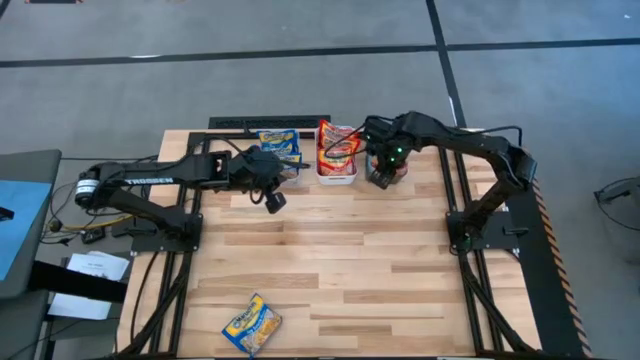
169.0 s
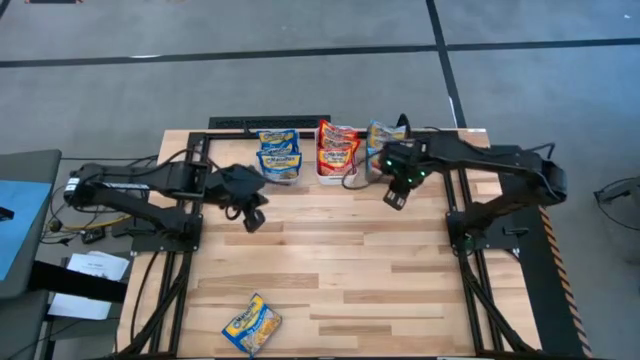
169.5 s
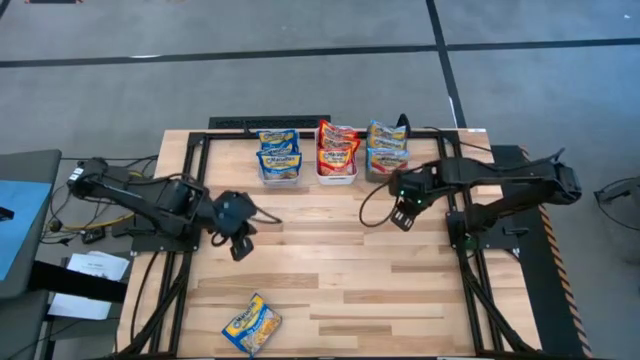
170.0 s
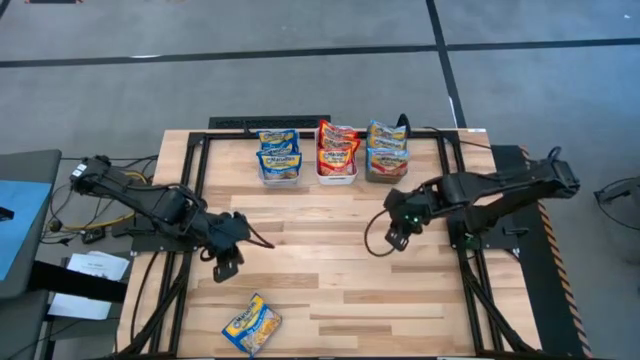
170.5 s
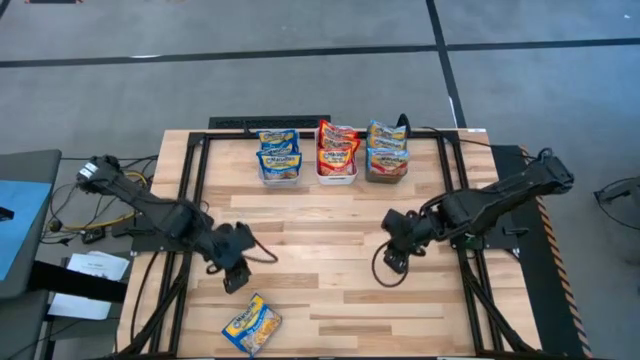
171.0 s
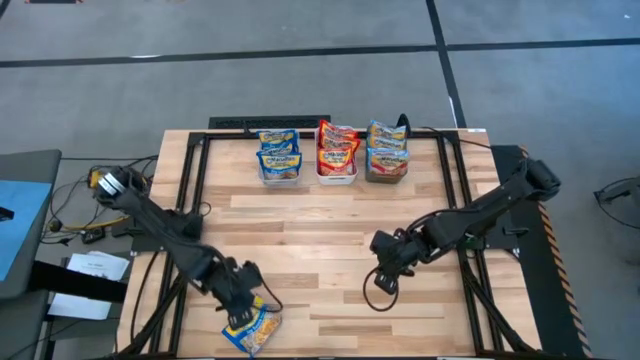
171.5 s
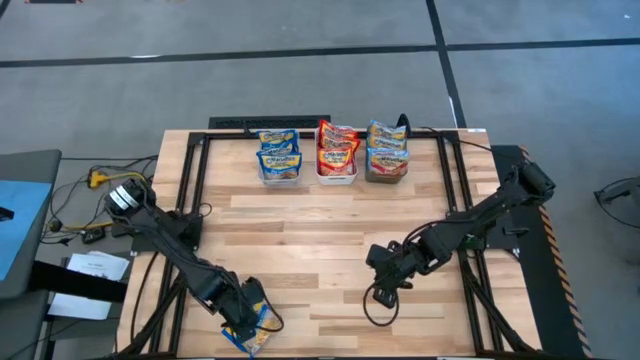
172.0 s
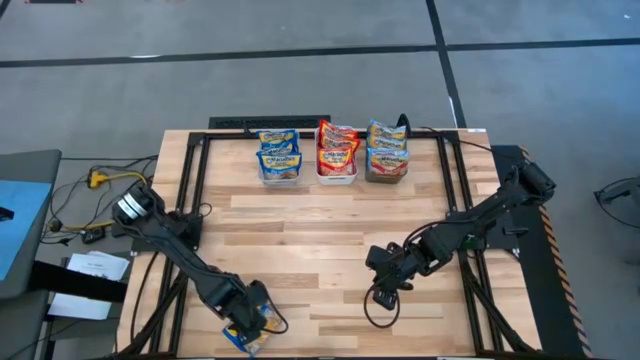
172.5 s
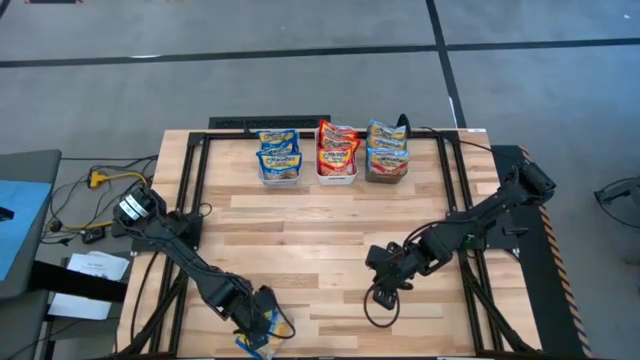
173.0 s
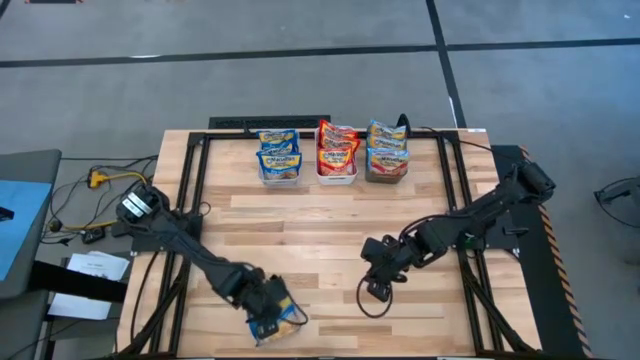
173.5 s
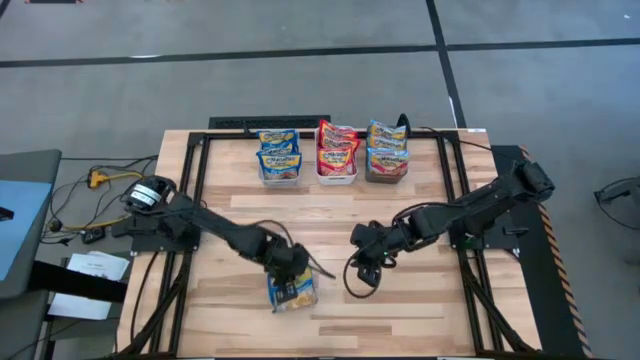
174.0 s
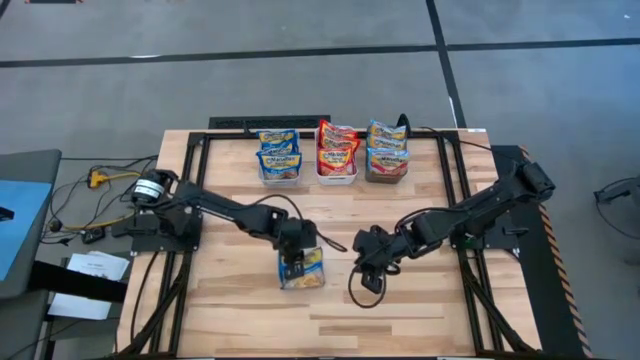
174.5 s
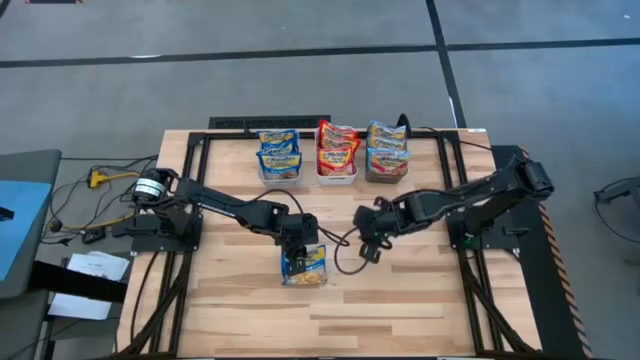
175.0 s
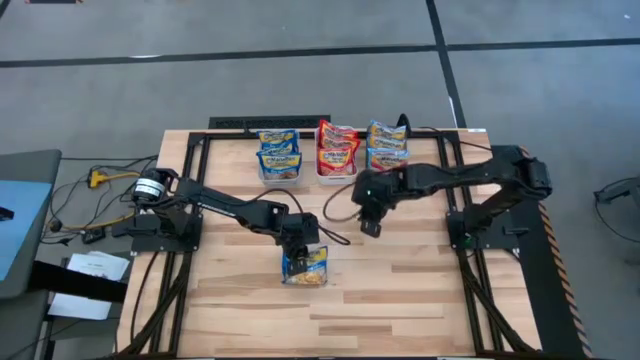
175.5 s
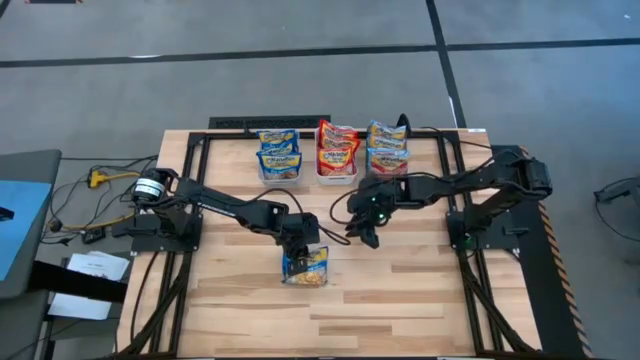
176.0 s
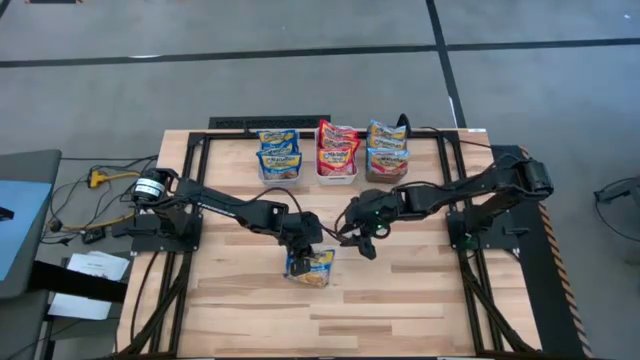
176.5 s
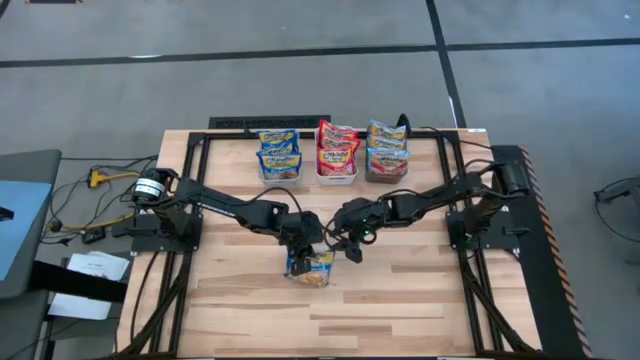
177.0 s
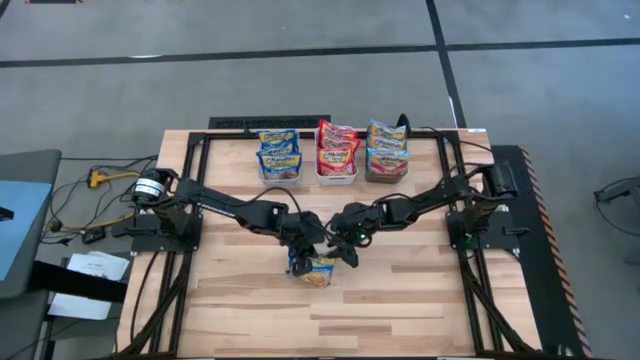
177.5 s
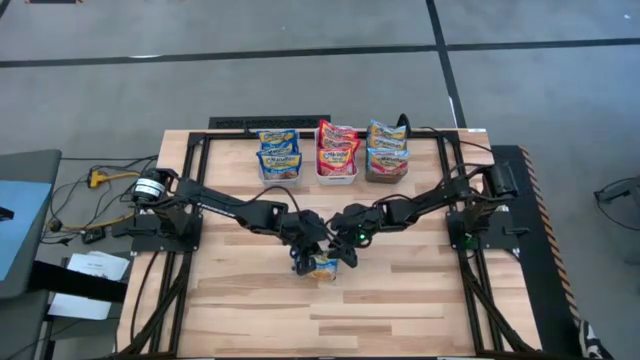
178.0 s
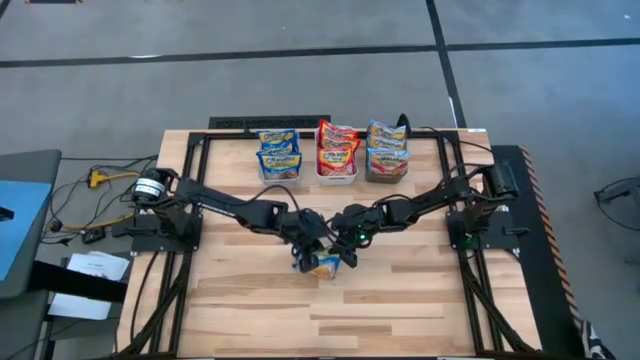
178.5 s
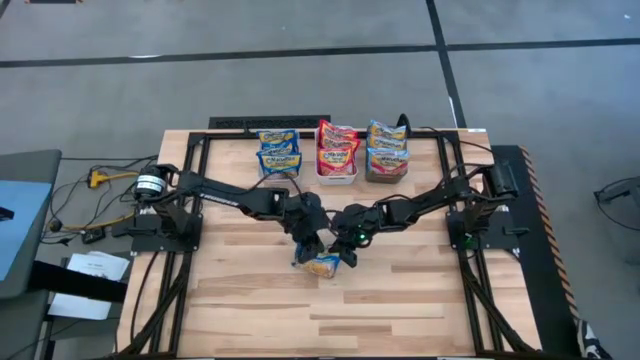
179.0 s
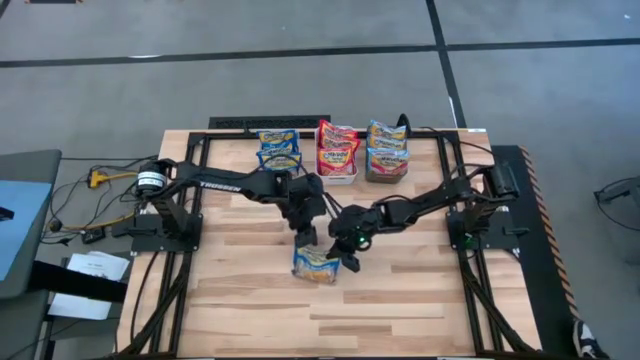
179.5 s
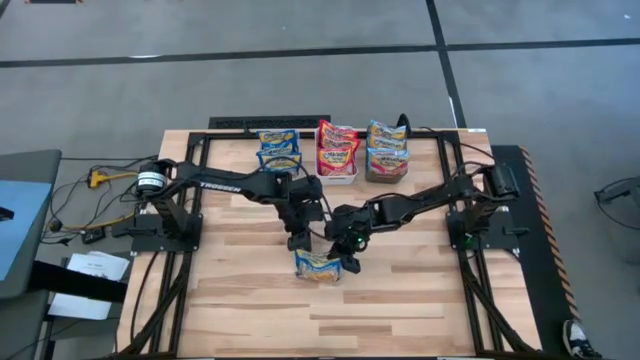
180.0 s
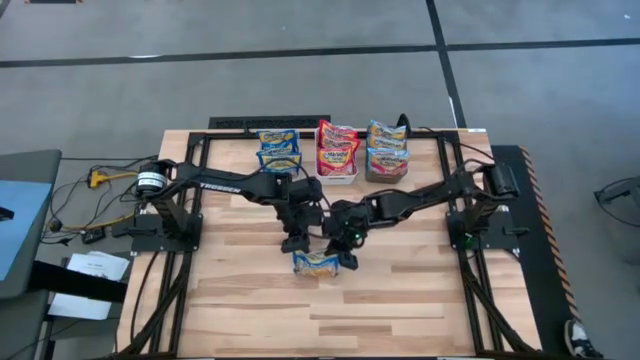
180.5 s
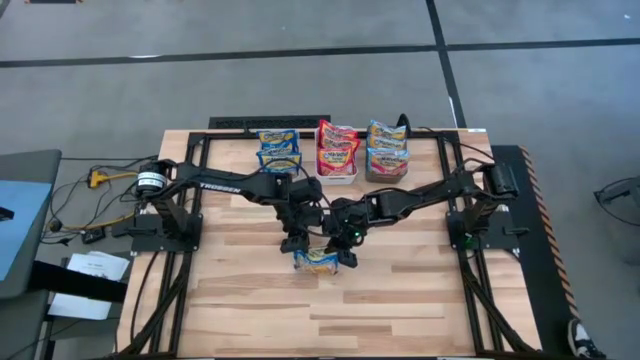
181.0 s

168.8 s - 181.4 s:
Task: Sort Maruchan noodles
Put the blue noodle pack into the transparent bin

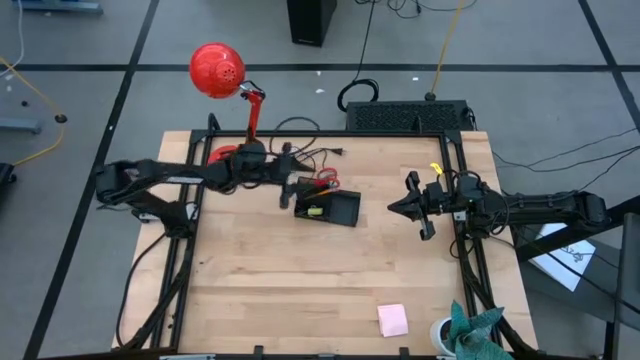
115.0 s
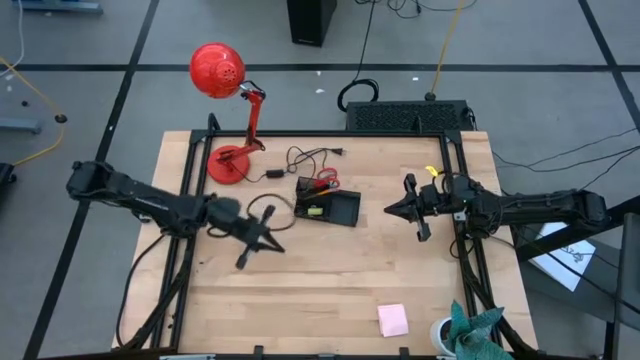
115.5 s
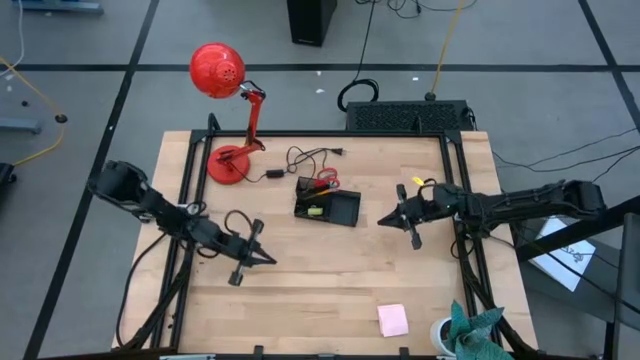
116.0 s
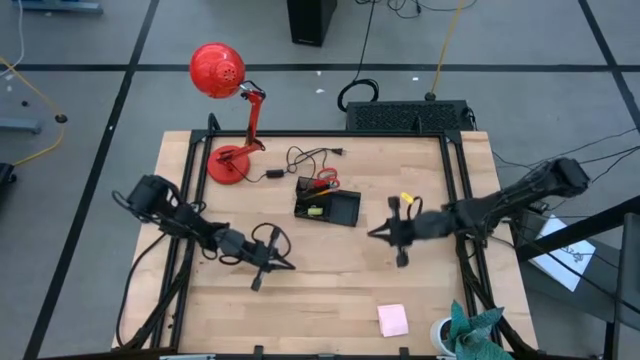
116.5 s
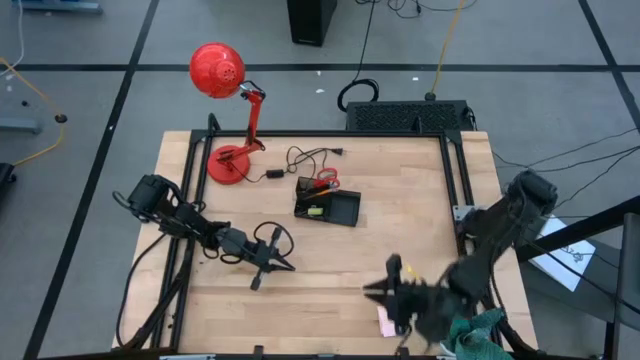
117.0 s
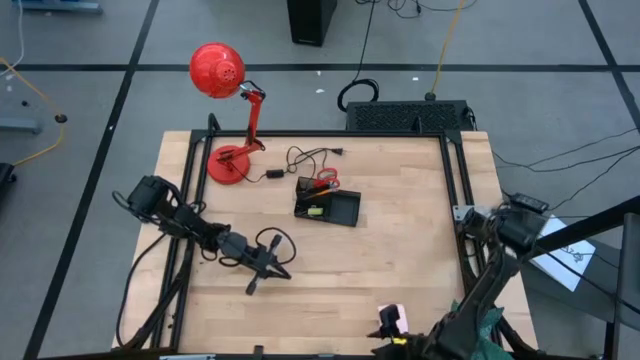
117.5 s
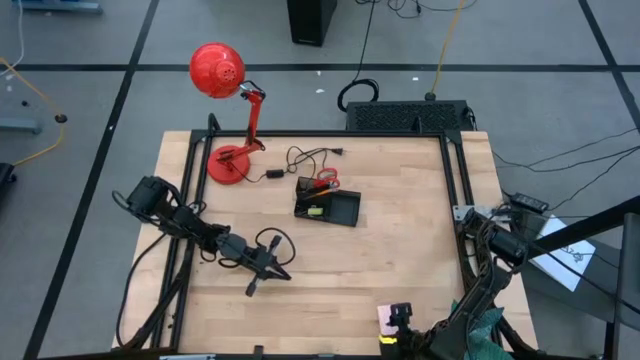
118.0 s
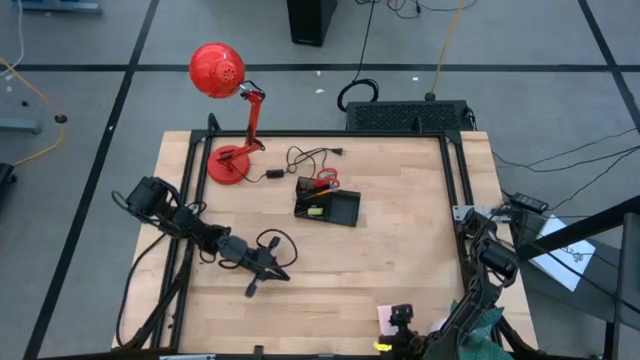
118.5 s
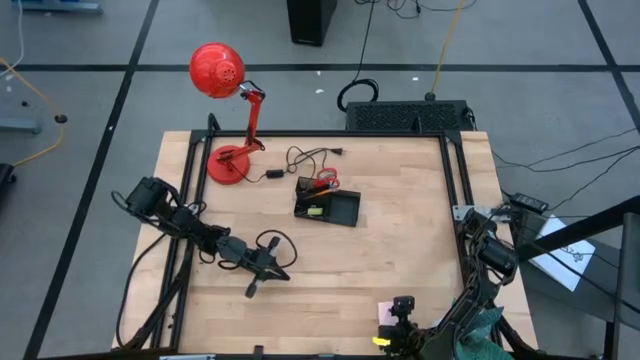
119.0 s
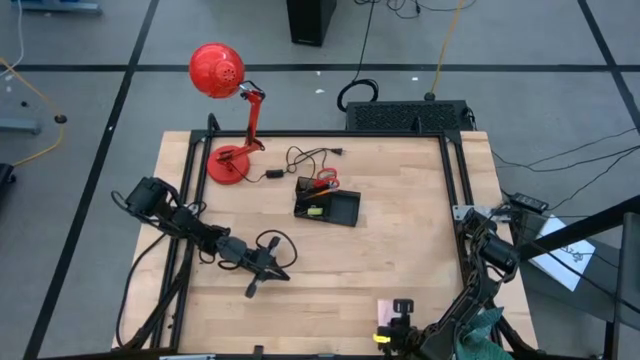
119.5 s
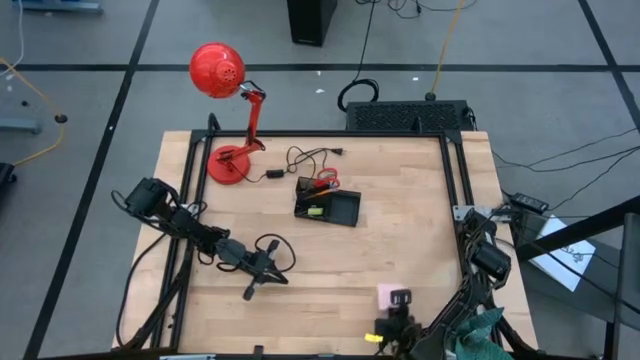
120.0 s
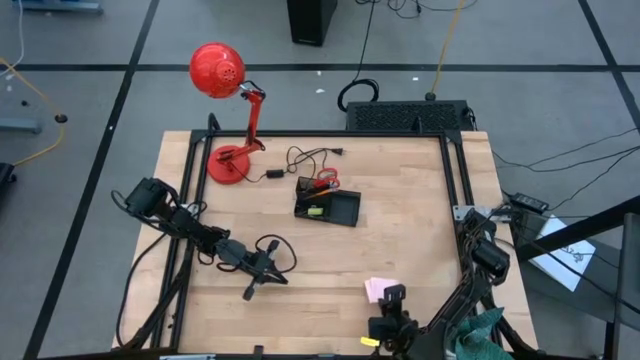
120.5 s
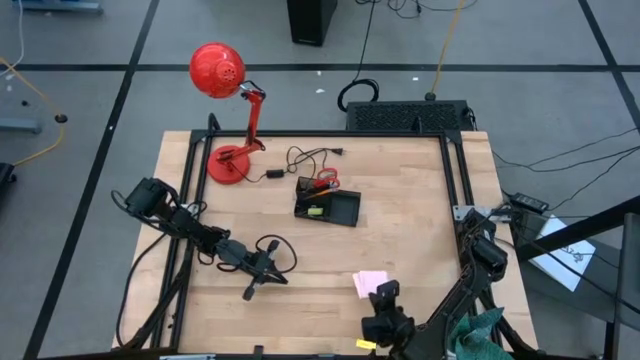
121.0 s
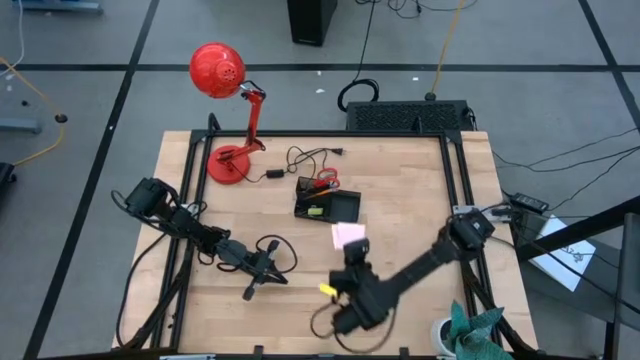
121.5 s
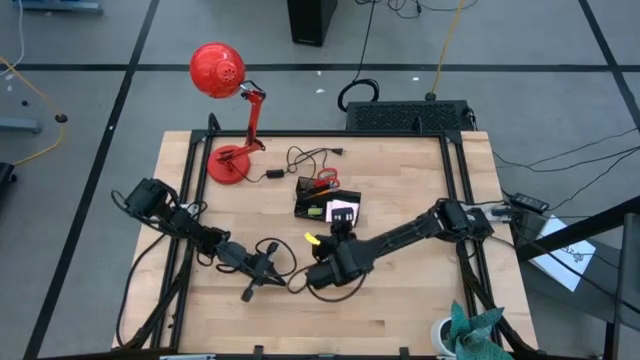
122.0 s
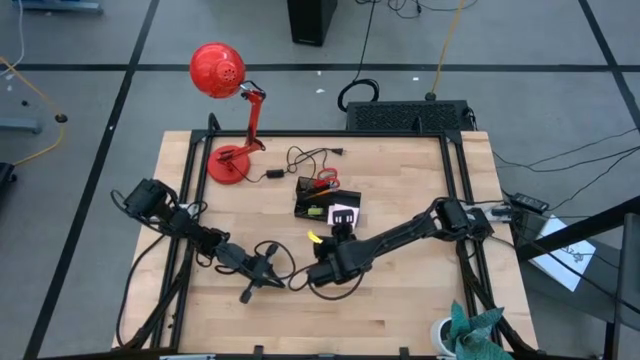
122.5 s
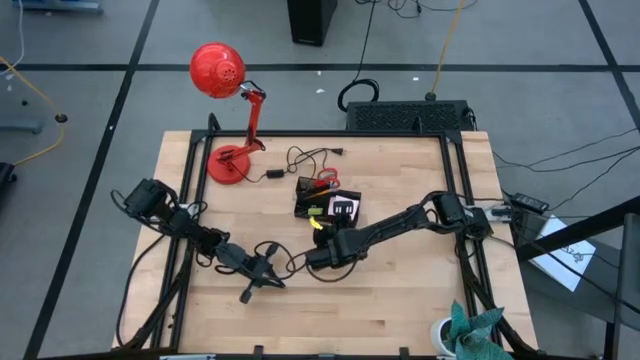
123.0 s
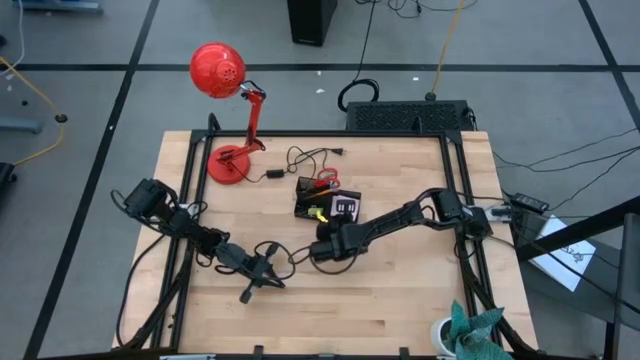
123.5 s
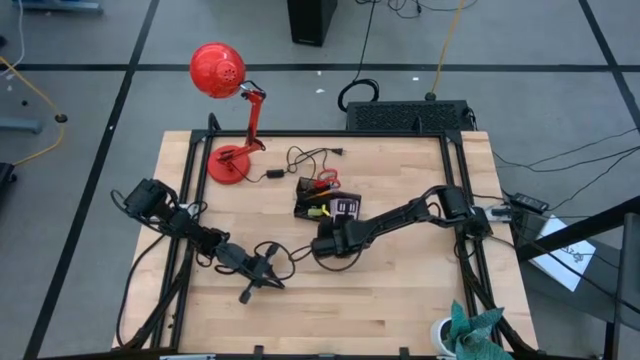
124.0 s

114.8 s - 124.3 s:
Task: Pick and place office supplies into organizer
Put the pink sticky note into the black desk organizer
